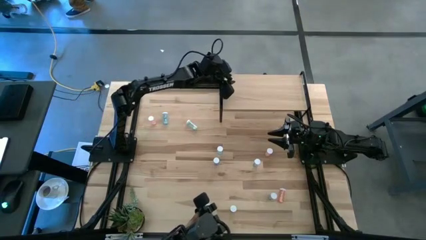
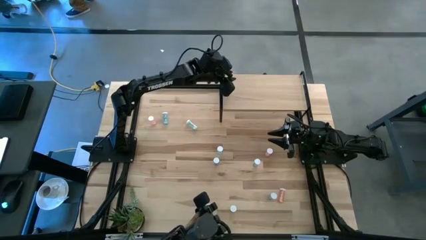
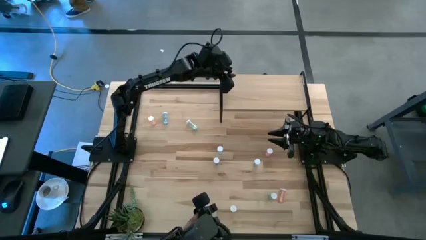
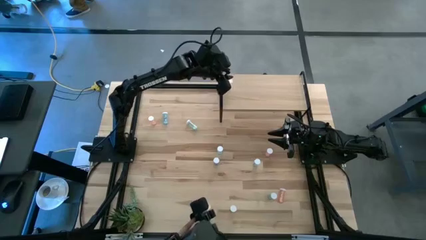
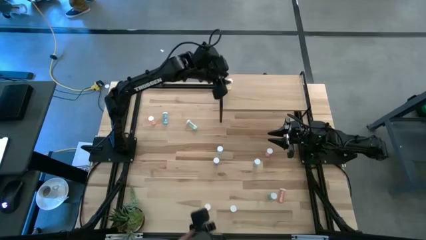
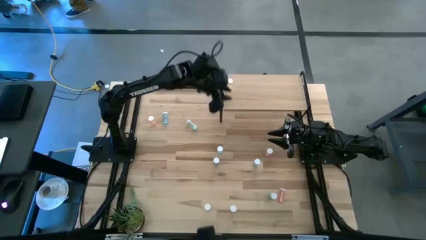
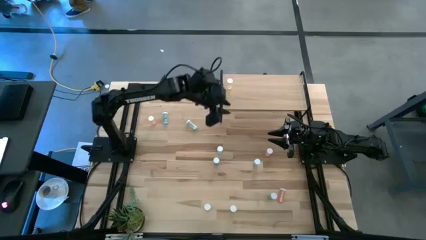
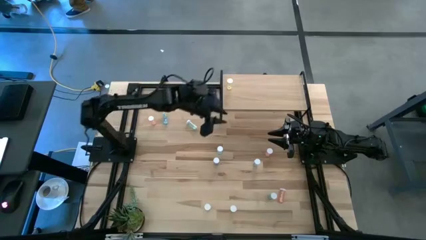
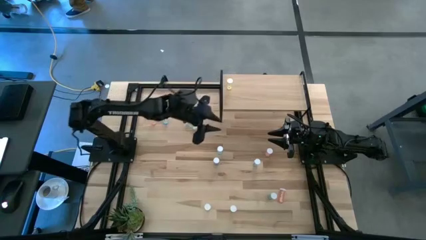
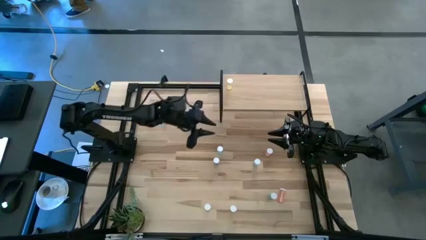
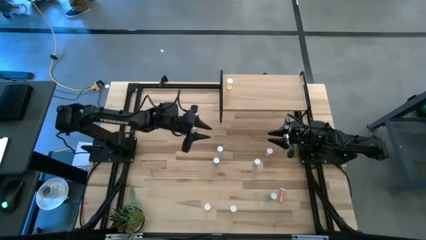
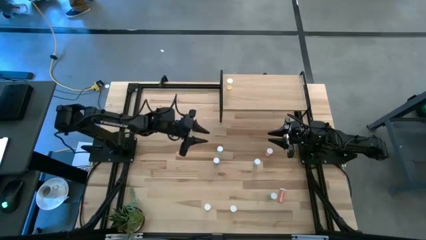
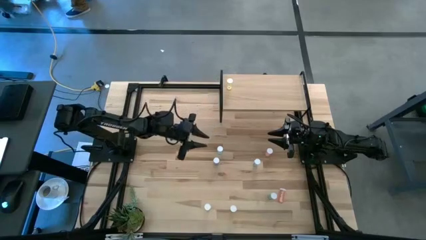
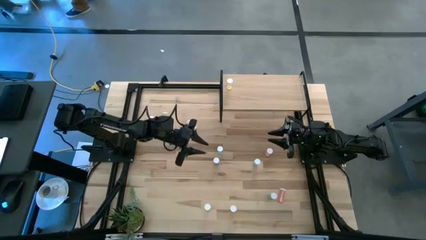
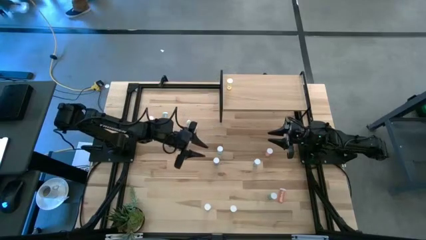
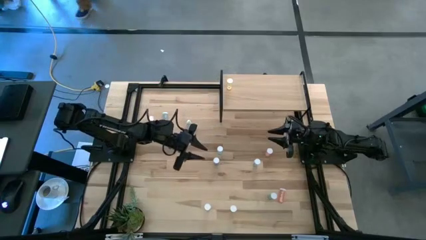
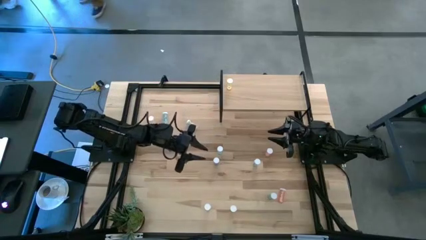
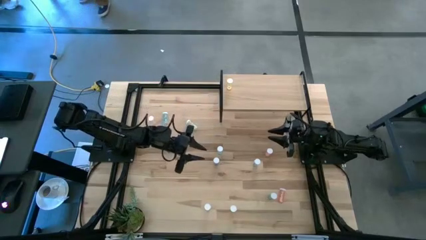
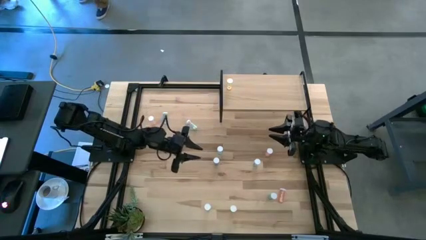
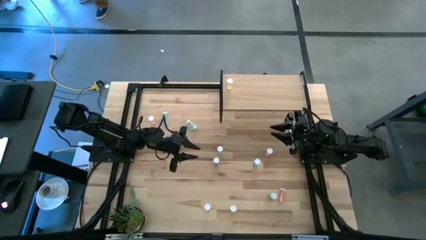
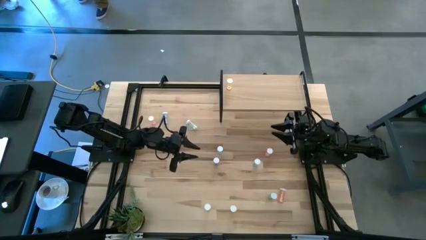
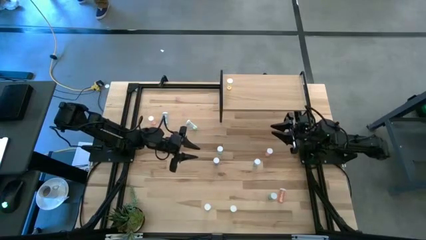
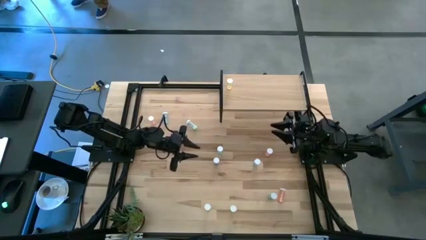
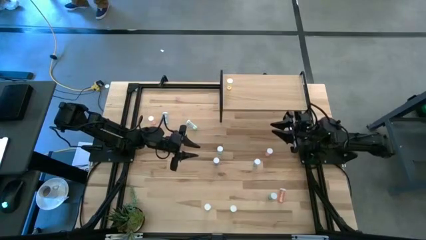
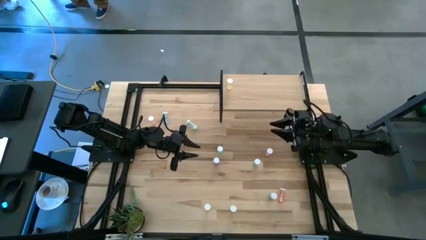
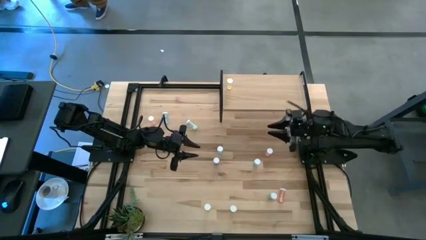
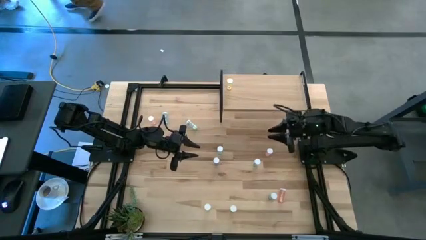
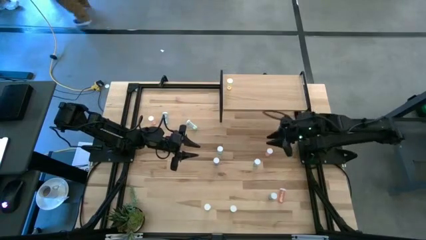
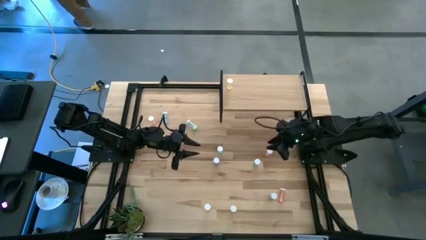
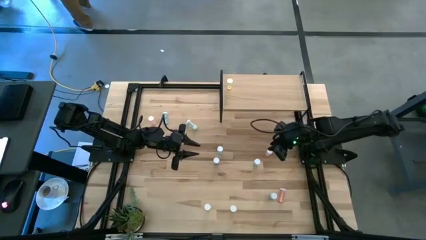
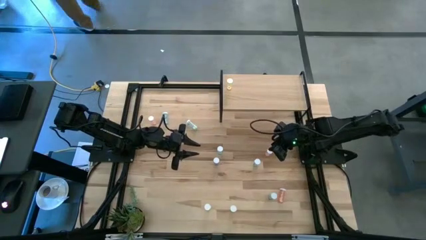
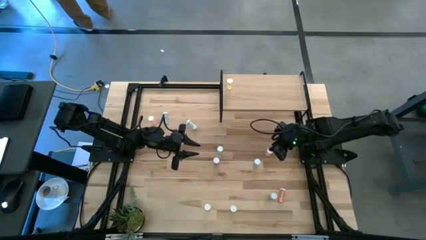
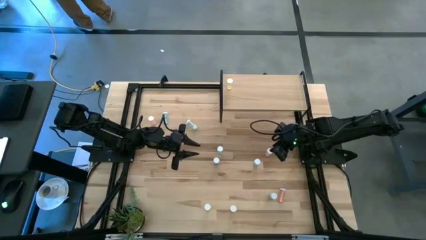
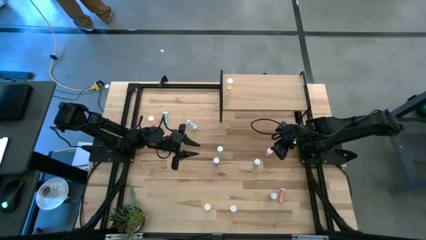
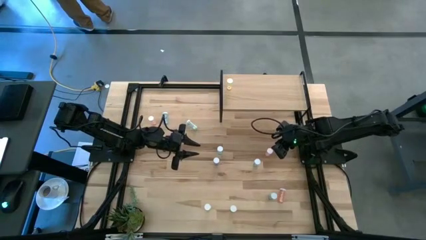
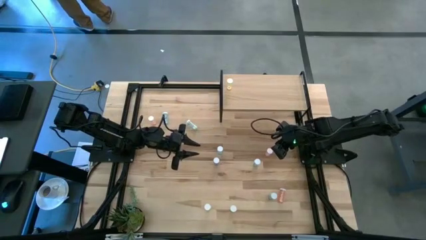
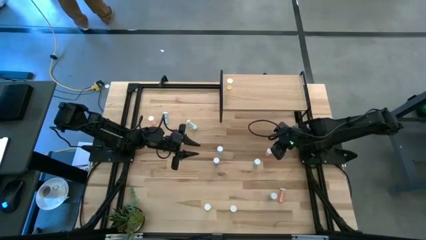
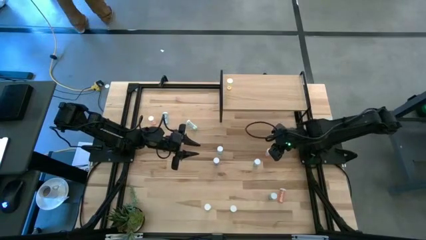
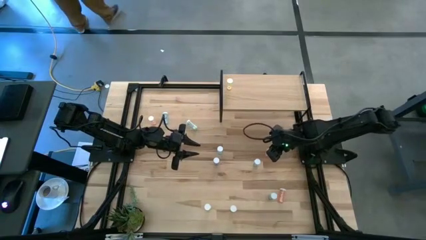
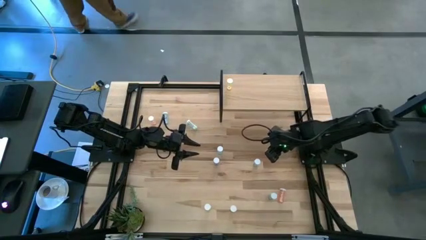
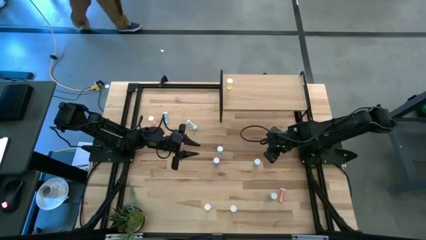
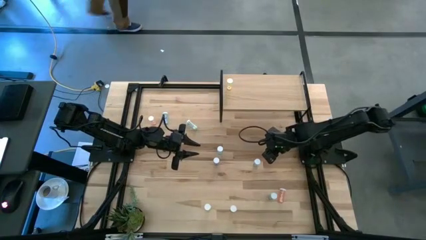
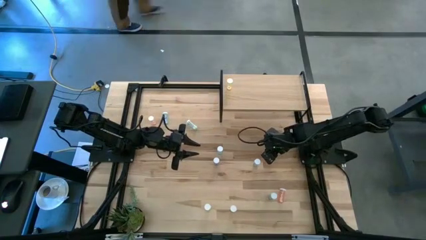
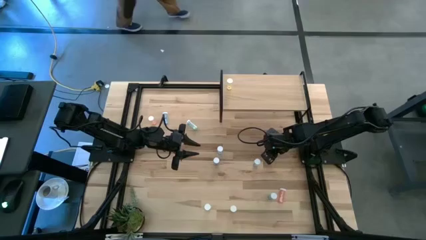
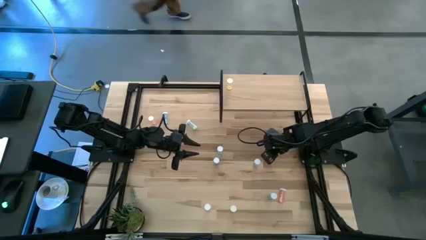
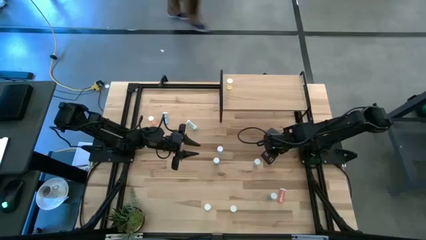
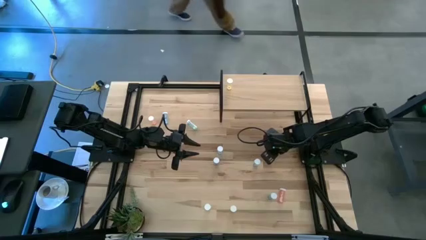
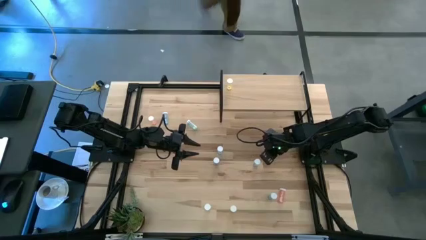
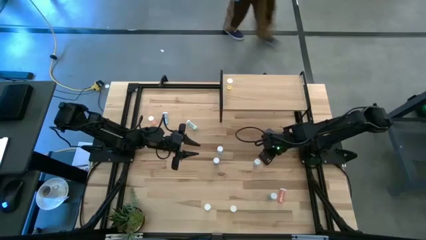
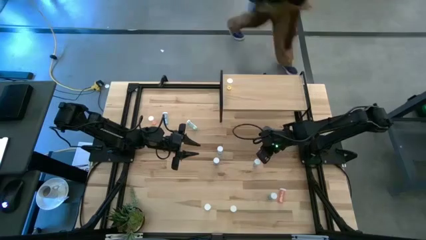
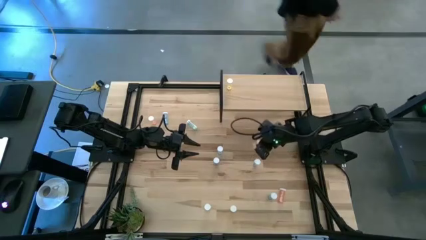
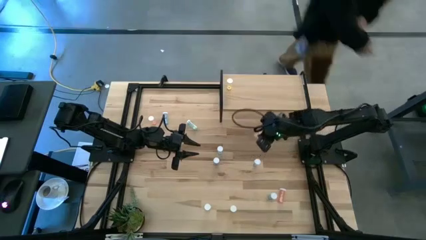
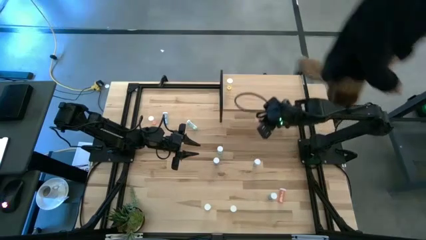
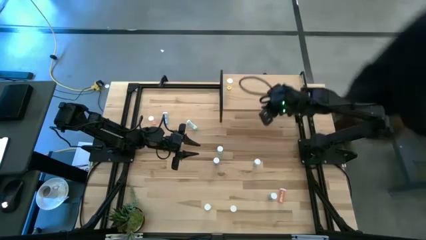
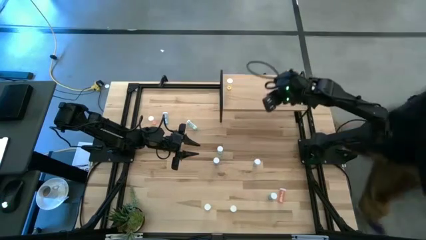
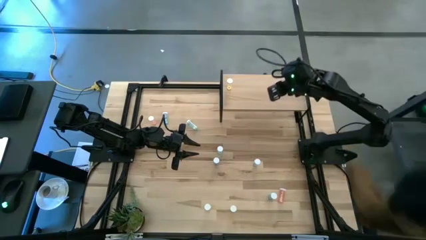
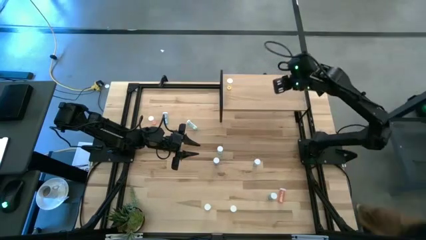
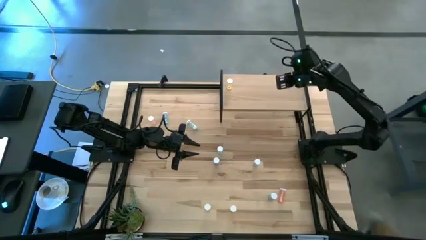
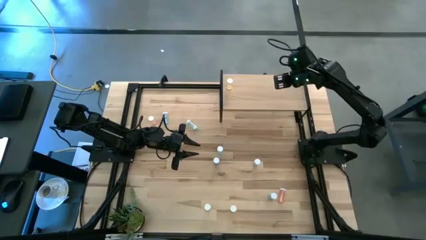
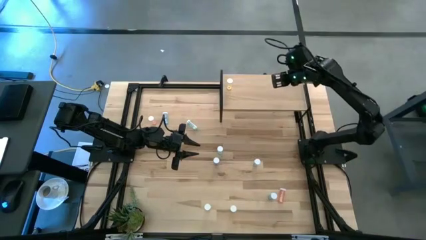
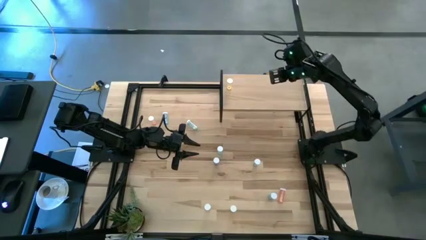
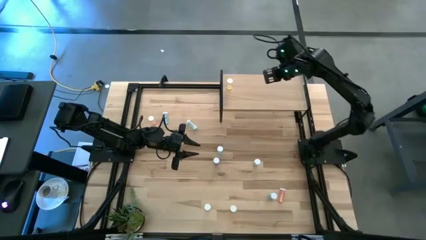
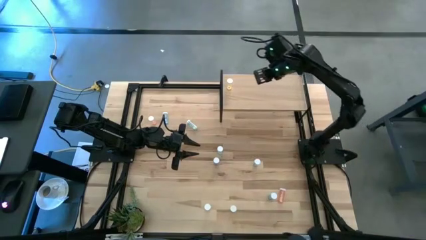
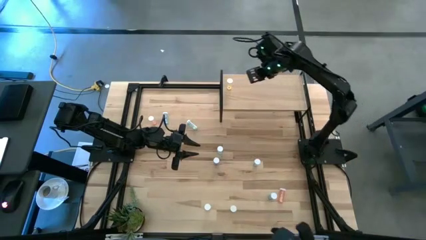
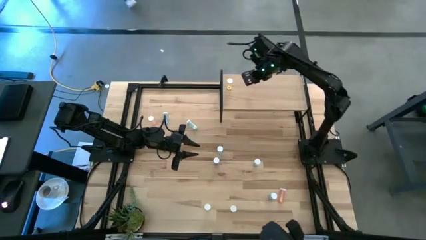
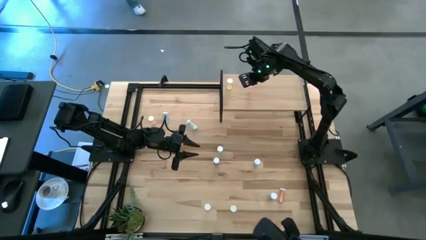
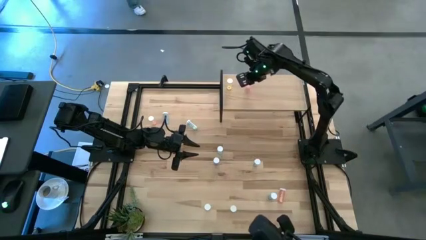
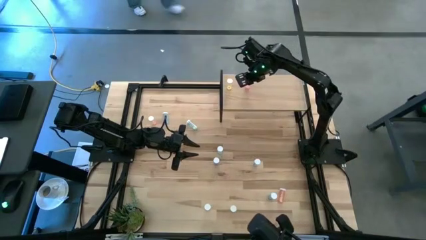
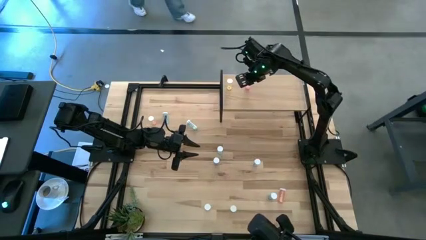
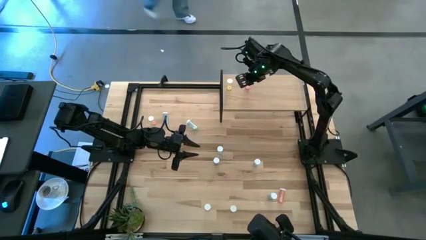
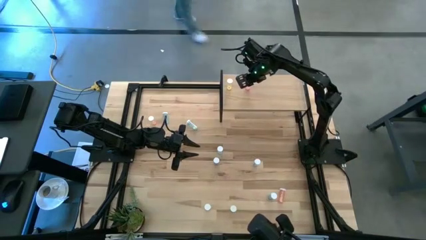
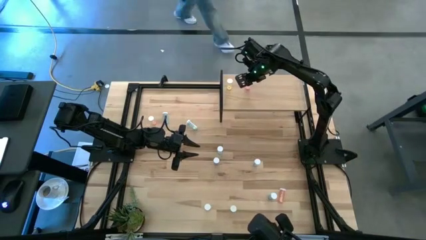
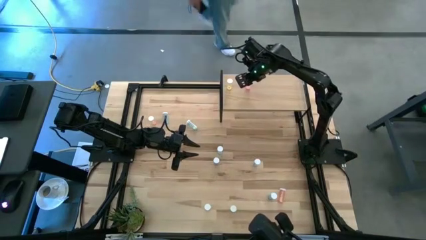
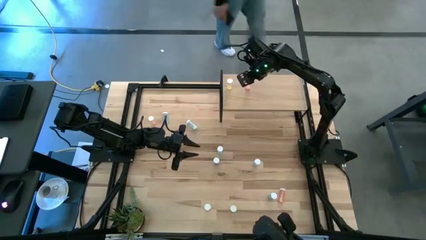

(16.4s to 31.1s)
Task: Pick and place medicine bottles onto shelf by color
Put the middle right pink pill bottle on the shelf

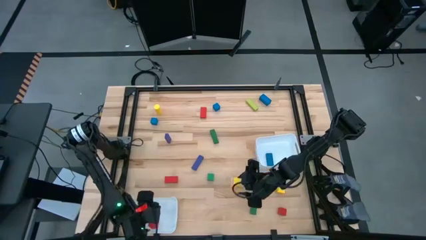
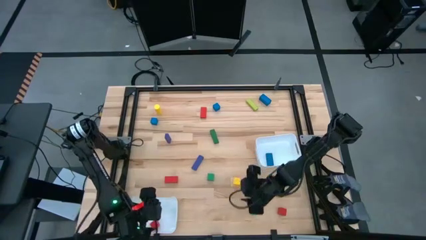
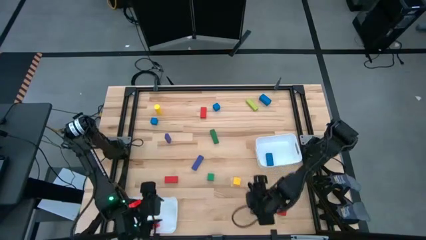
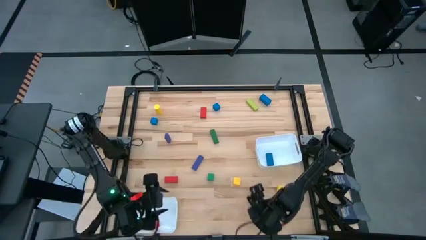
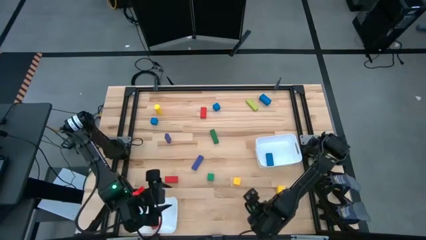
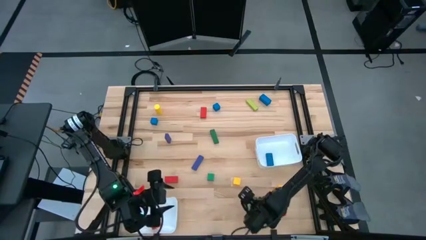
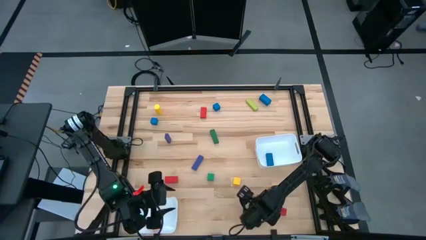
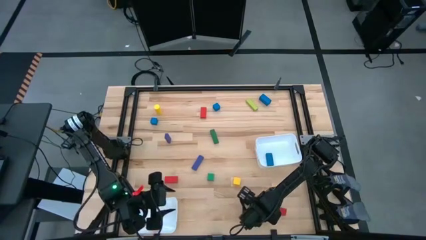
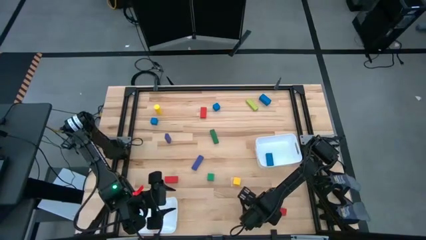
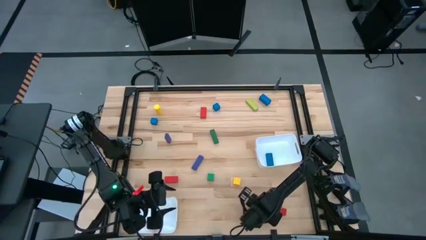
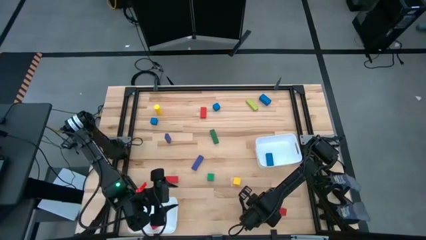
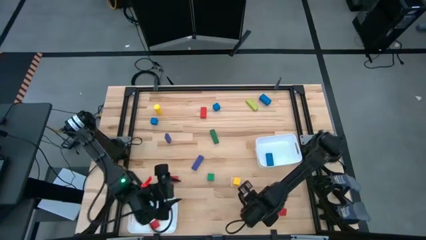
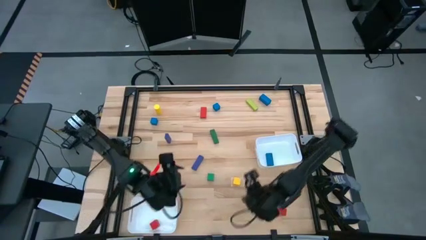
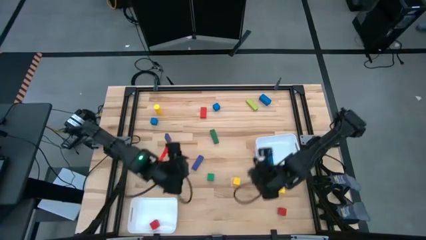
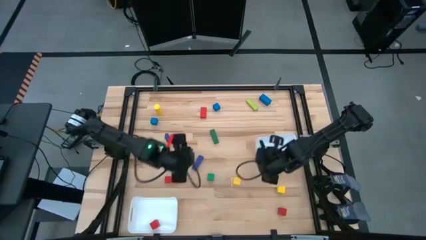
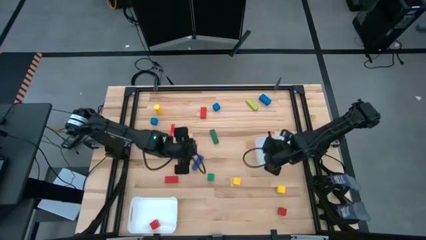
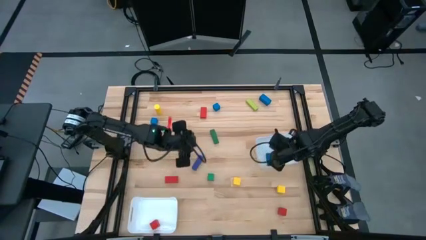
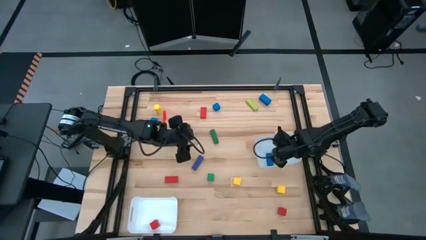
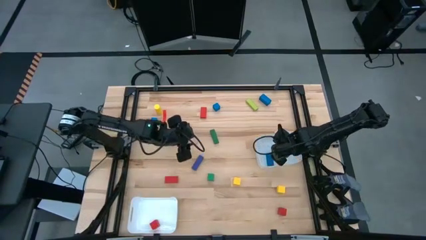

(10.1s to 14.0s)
Task: Sort blocks by size
Put the green rectangular block into the top white bin
